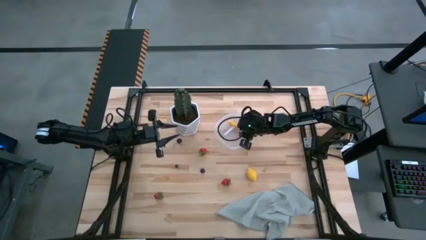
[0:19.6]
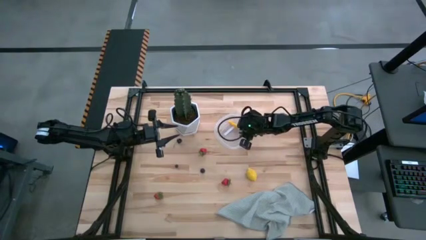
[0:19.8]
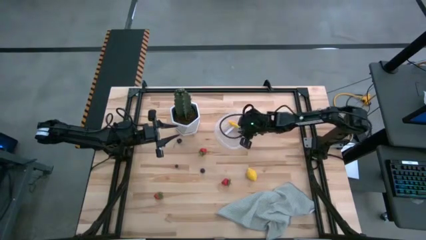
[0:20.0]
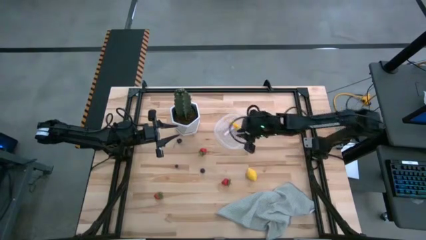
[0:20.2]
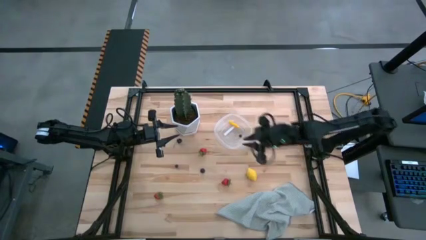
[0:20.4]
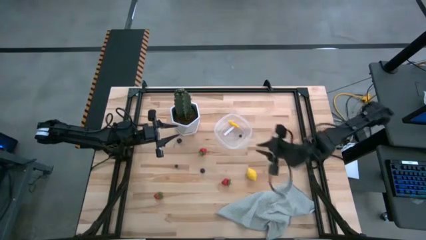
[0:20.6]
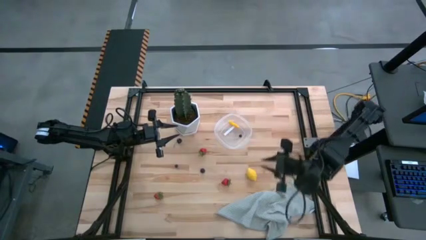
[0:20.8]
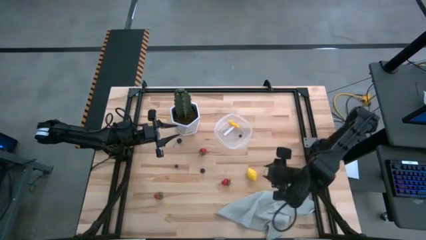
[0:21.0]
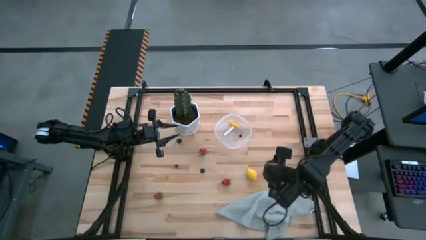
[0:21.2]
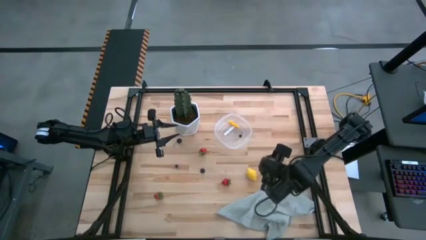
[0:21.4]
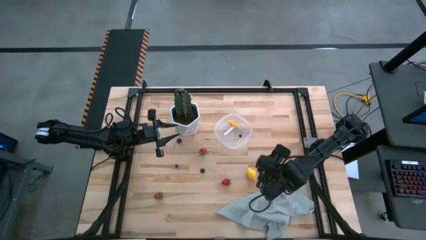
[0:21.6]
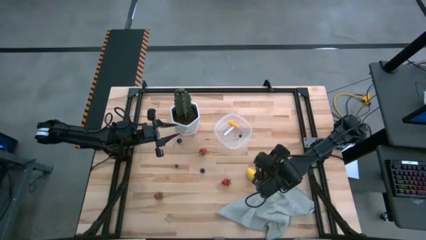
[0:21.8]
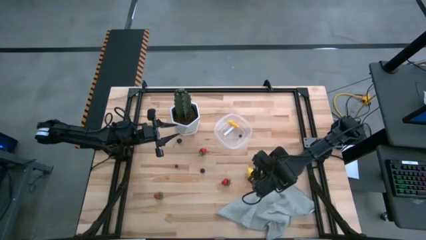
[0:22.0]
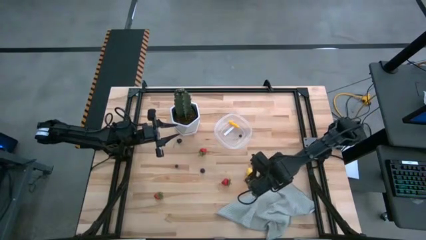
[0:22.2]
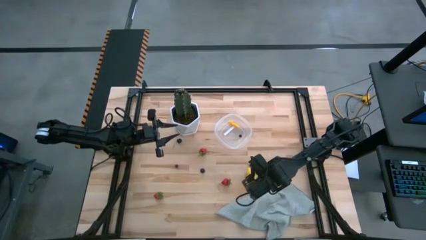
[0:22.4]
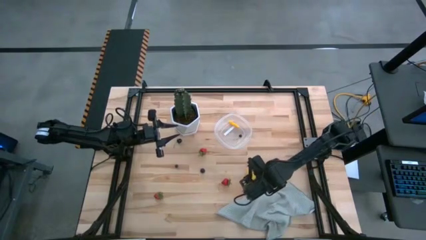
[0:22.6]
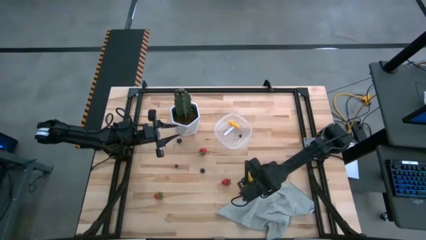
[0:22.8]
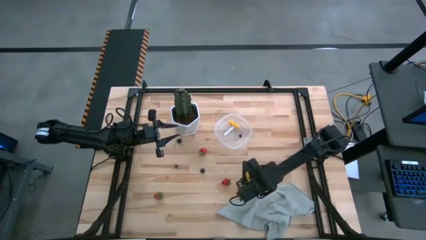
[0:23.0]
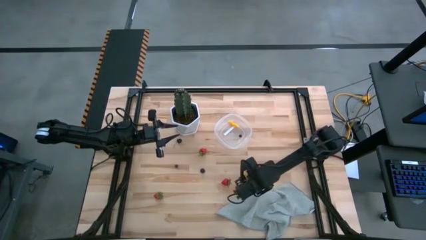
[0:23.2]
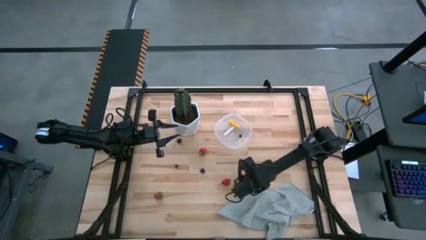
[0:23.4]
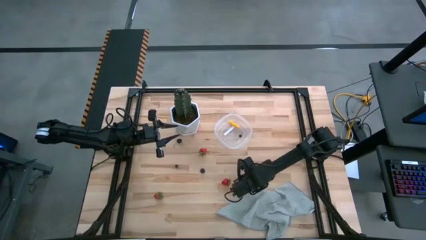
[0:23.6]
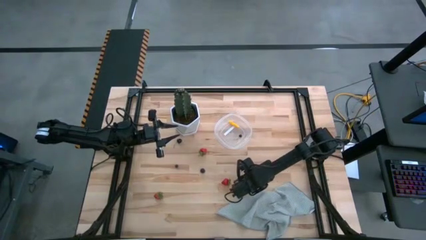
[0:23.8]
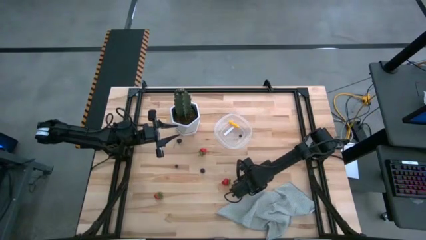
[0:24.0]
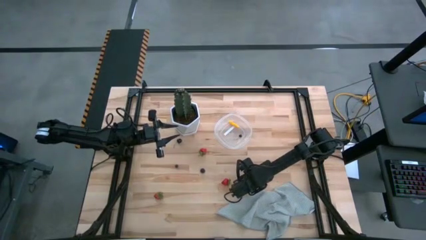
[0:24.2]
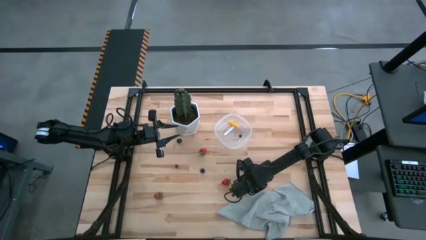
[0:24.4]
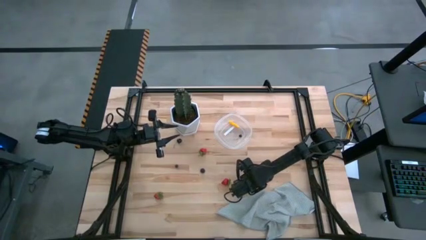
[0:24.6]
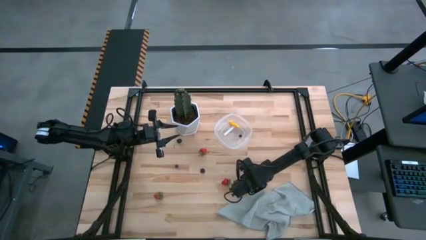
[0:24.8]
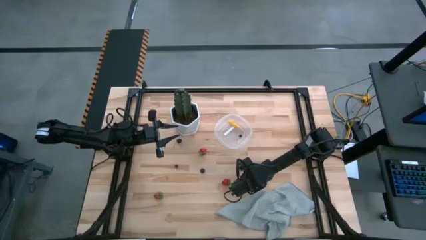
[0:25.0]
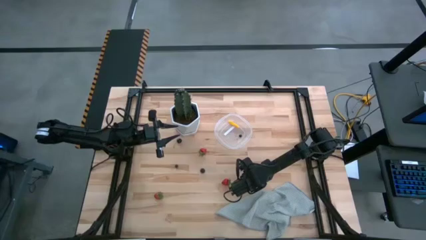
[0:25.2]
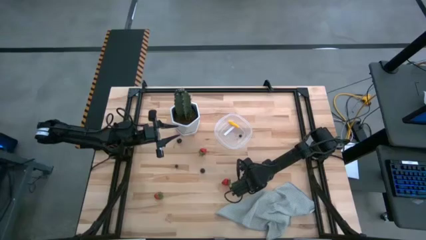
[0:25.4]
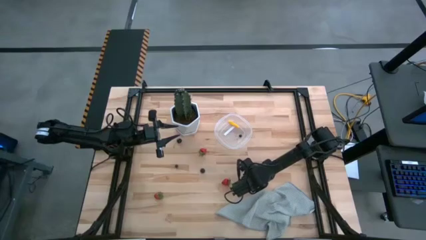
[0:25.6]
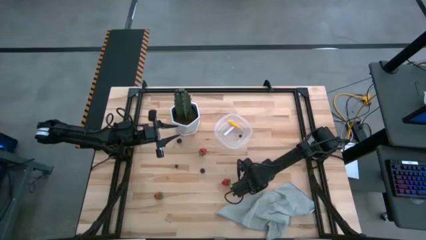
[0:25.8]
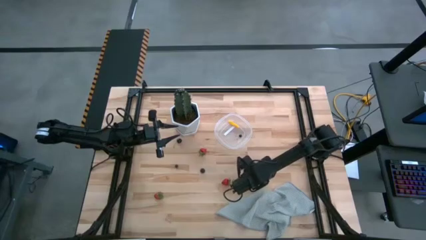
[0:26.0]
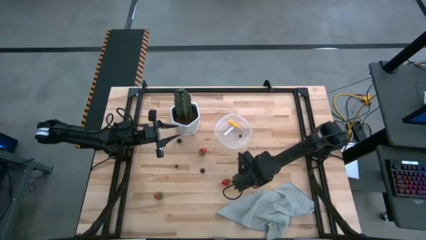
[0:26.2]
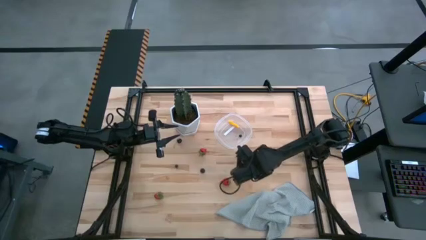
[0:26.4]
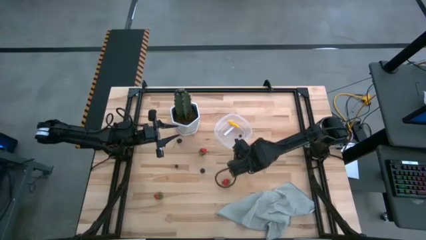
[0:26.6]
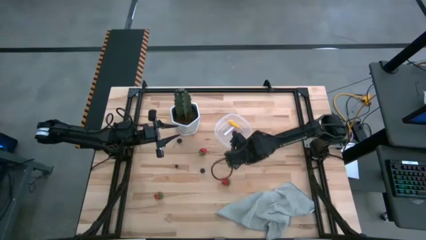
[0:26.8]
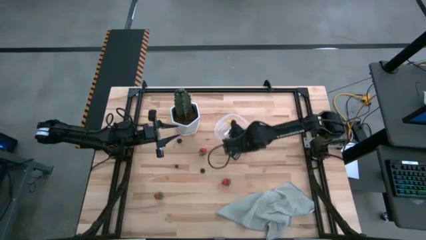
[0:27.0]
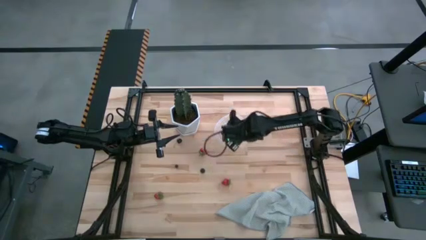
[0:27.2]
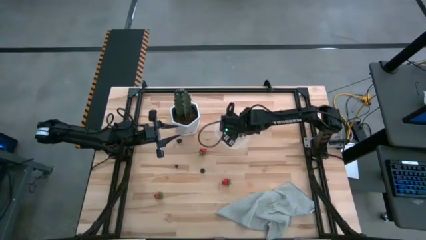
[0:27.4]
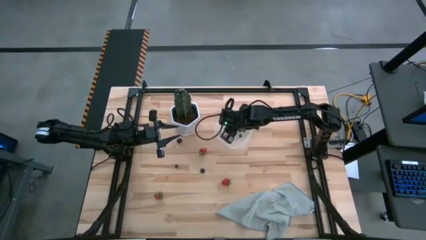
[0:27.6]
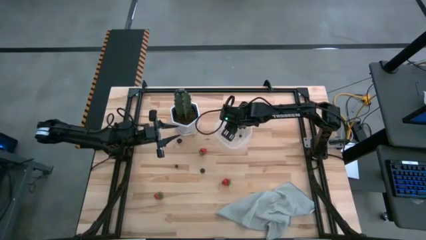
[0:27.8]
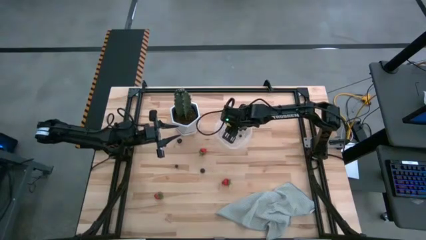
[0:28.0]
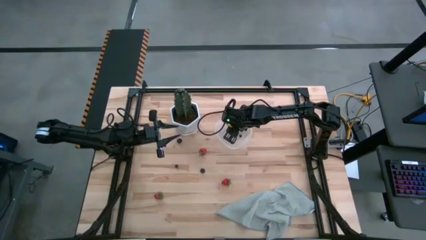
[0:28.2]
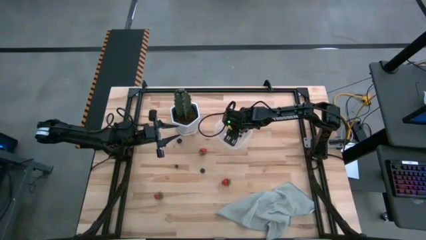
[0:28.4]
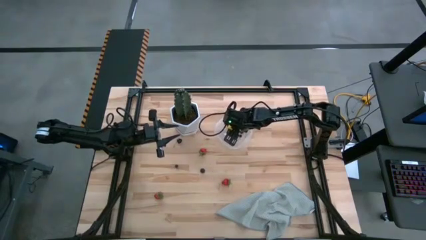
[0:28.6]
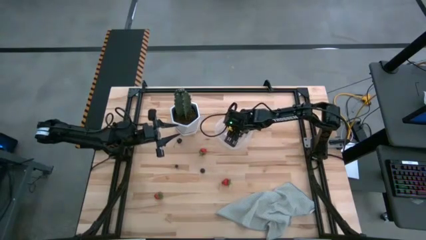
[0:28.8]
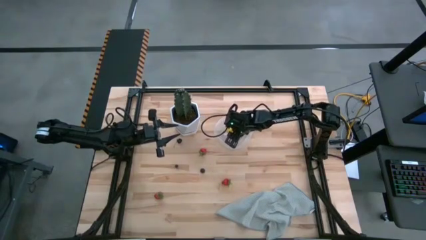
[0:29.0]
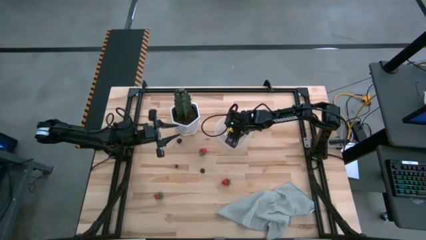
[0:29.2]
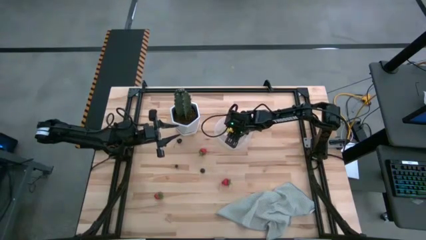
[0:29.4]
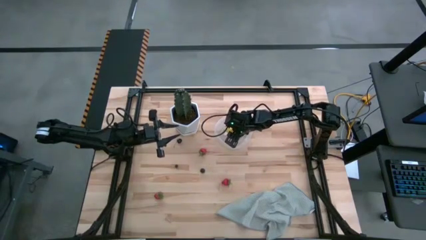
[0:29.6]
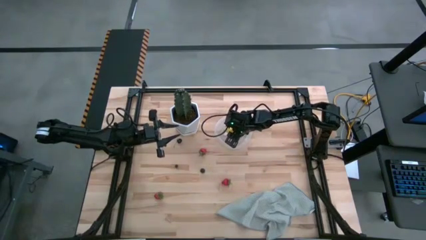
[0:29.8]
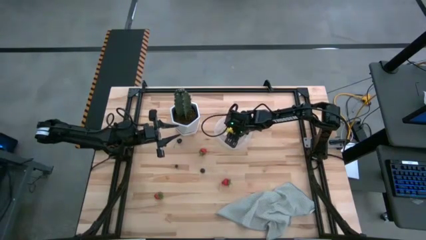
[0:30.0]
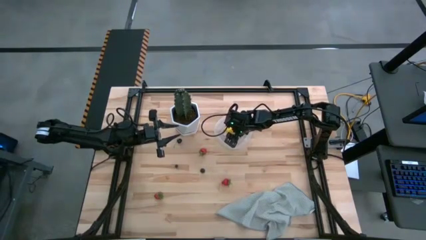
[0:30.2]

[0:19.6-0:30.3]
Task: Pick and placing Produce into tupperware
Put the yellow lemon into the transparent container

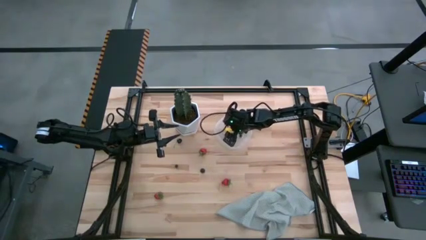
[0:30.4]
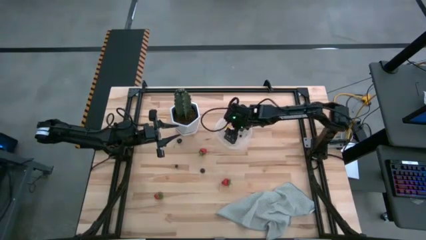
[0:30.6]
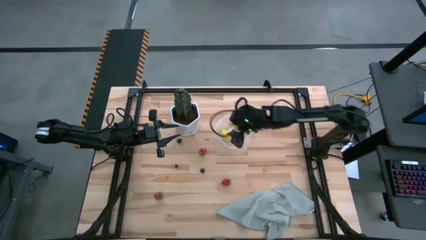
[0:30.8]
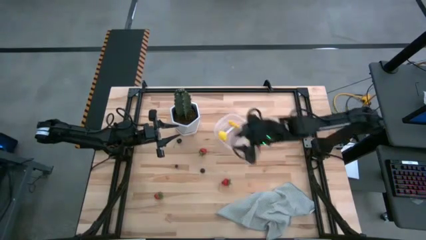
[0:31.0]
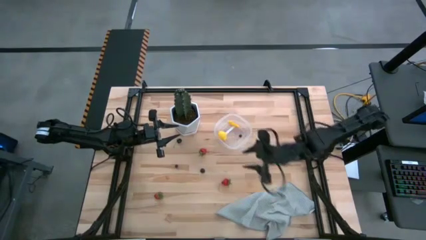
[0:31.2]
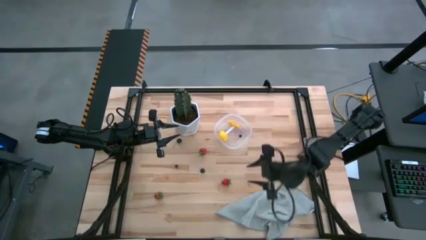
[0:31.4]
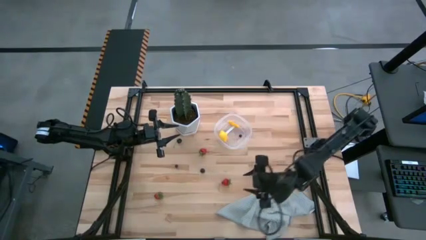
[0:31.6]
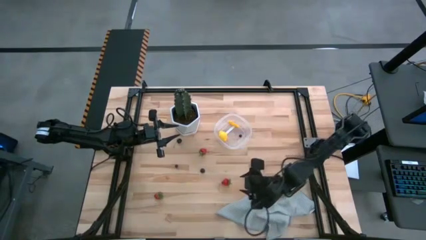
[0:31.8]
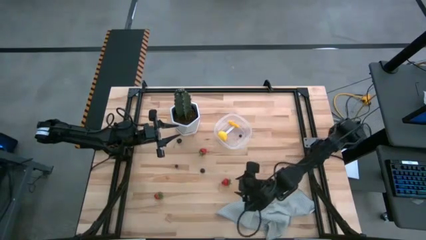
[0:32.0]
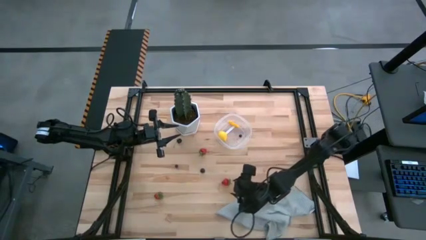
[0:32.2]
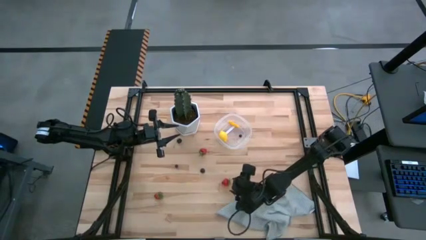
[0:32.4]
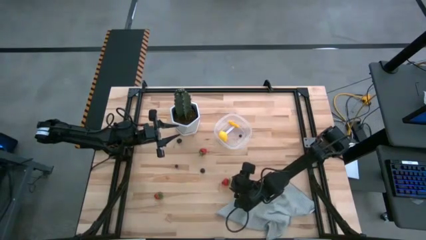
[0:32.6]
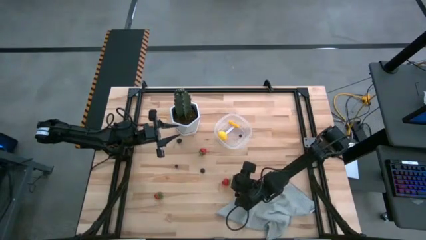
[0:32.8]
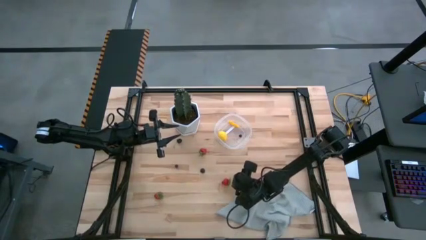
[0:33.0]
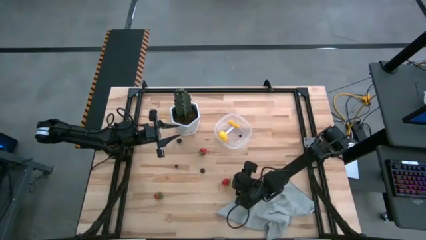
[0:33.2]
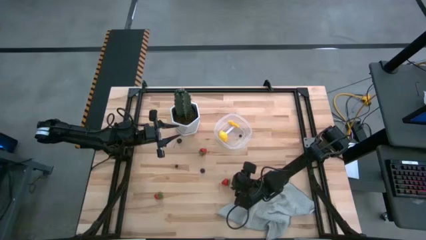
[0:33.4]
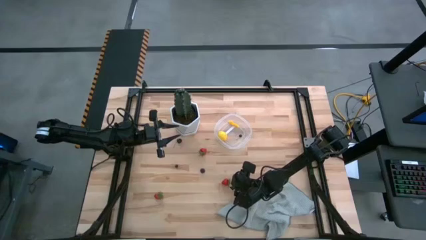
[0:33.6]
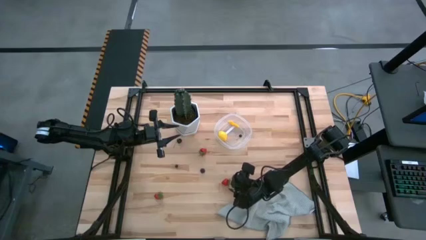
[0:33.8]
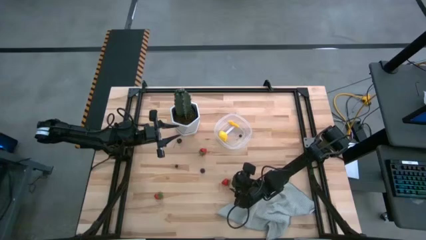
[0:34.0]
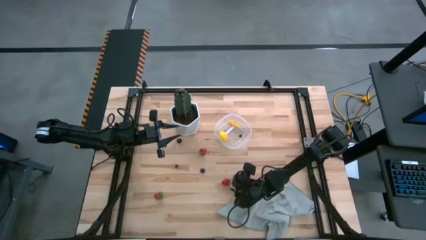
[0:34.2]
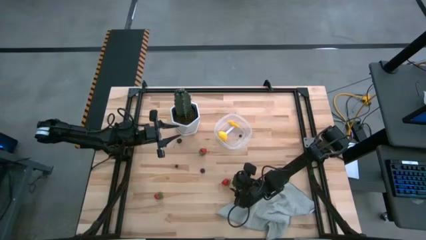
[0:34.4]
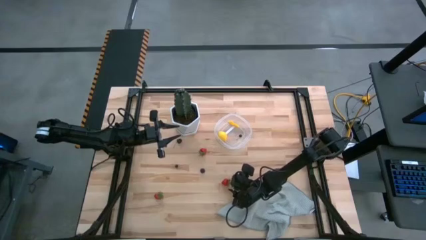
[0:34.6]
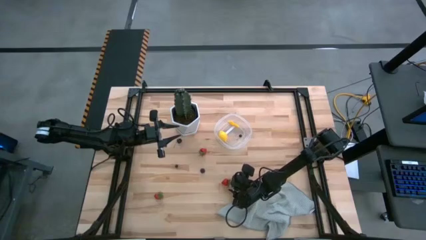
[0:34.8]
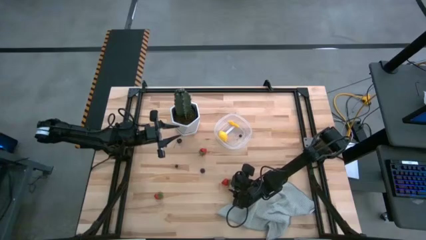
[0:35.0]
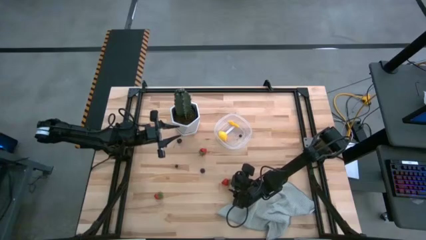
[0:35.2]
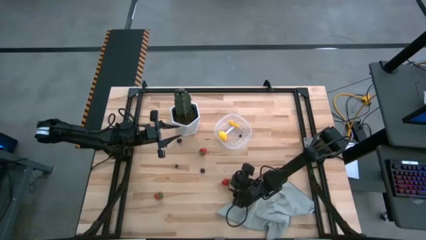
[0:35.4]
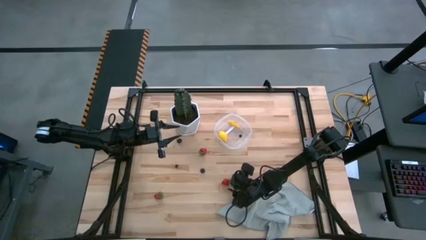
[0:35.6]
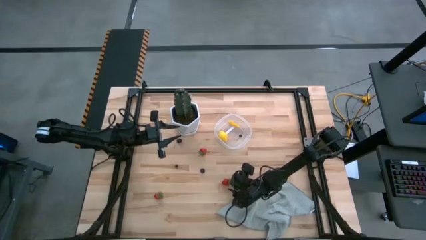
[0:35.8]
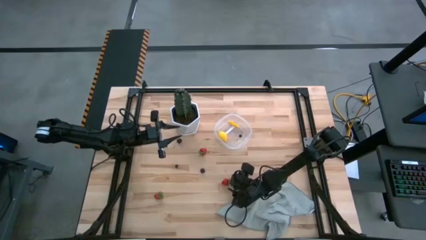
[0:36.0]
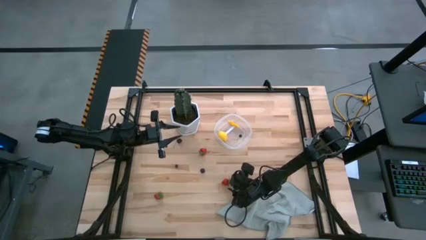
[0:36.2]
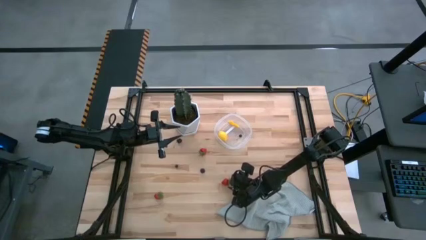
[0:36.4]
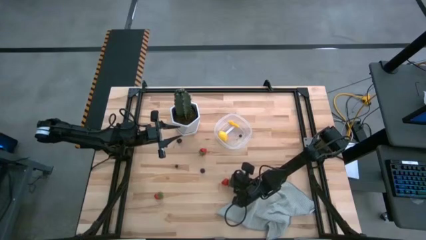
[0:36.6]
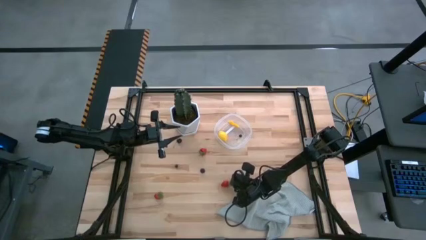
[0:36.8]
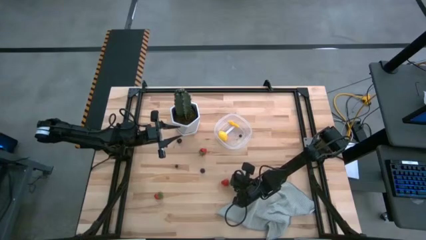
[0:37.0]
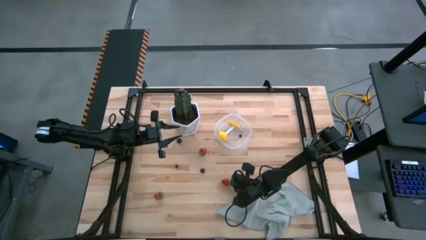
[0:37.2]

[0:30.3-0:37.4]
Put the middle right red strawberry into the transparent container
